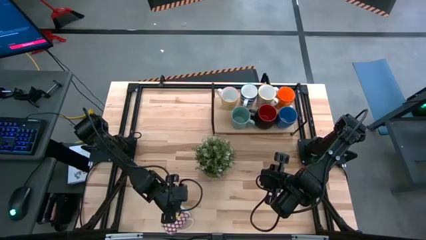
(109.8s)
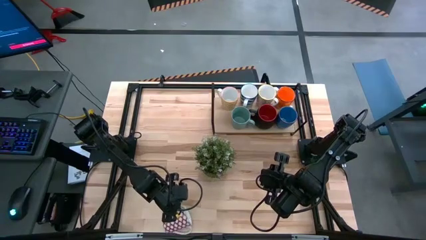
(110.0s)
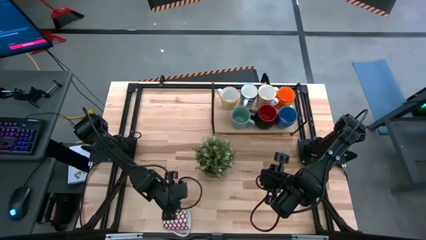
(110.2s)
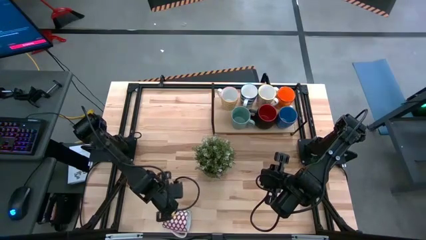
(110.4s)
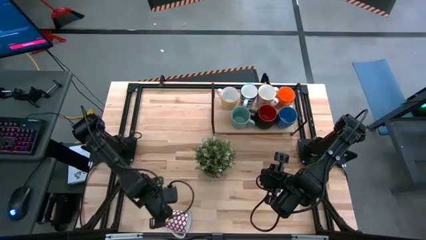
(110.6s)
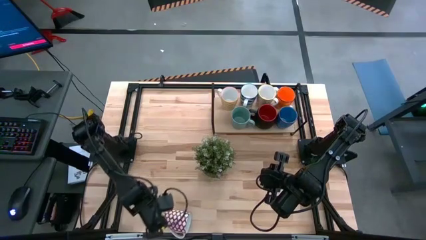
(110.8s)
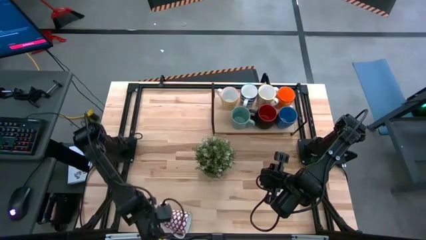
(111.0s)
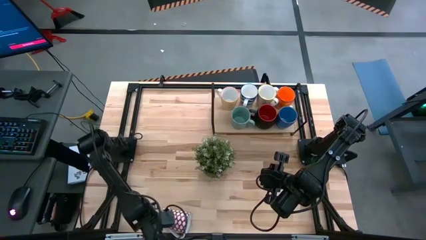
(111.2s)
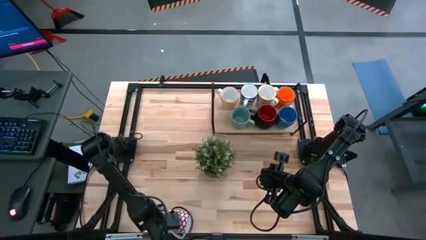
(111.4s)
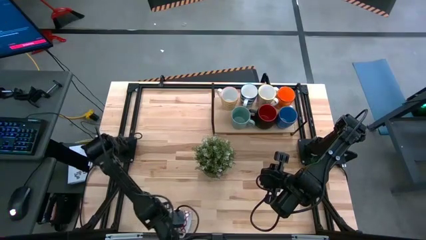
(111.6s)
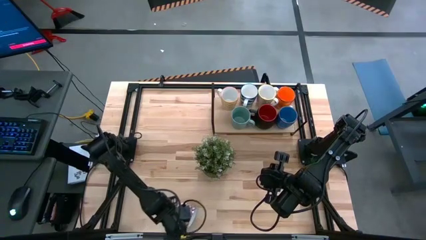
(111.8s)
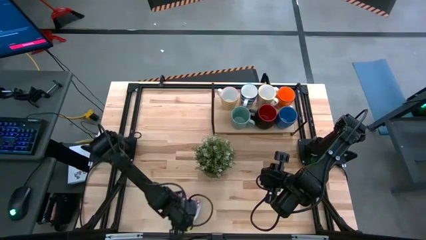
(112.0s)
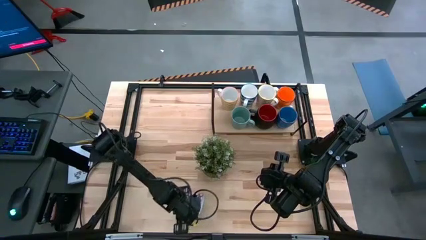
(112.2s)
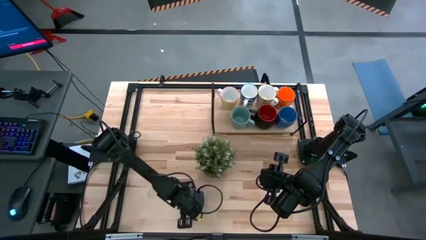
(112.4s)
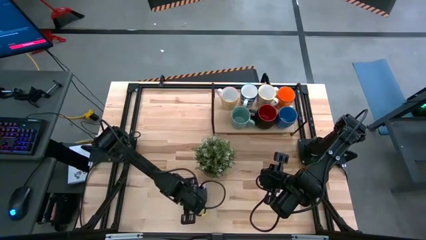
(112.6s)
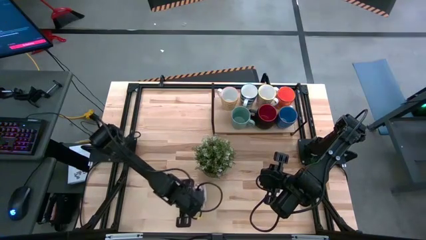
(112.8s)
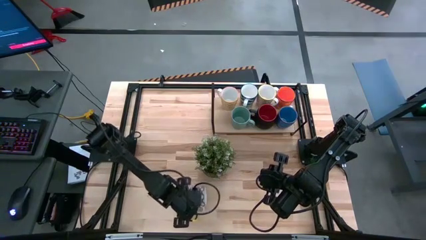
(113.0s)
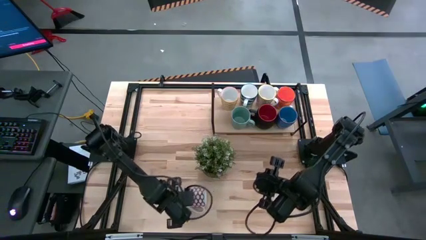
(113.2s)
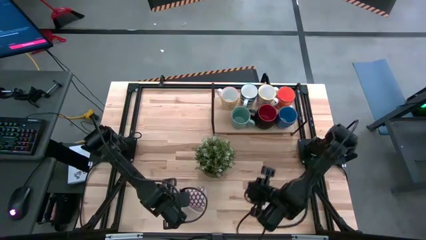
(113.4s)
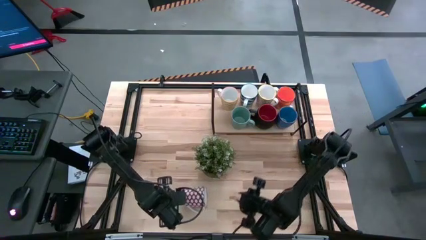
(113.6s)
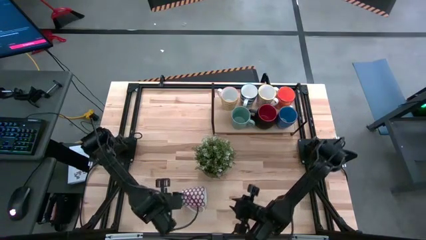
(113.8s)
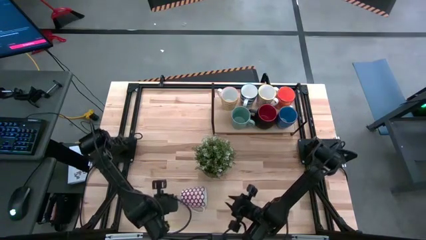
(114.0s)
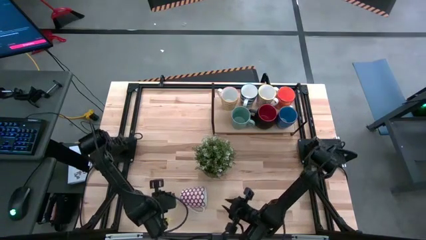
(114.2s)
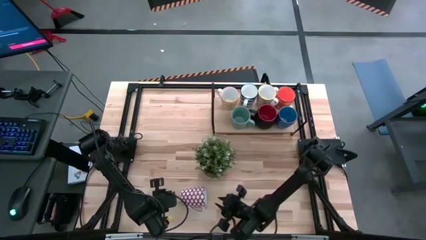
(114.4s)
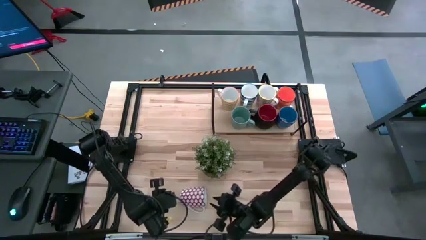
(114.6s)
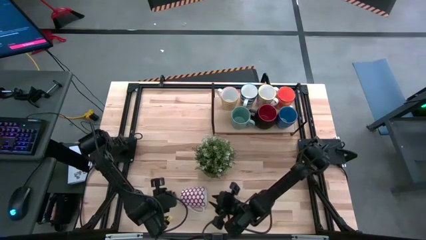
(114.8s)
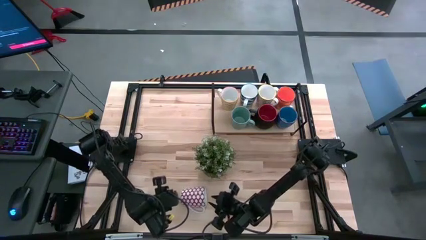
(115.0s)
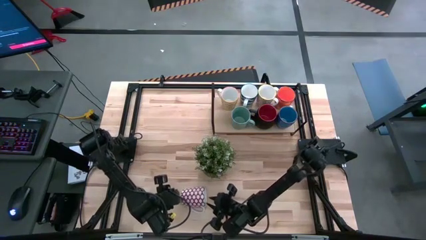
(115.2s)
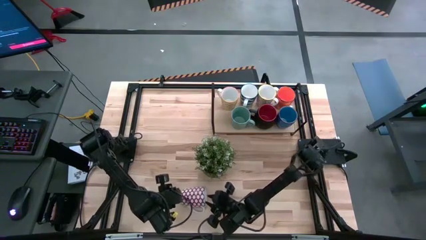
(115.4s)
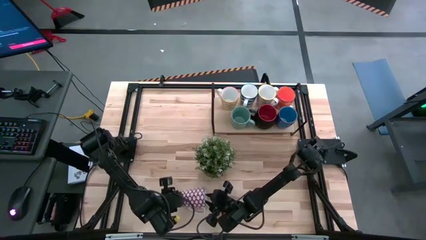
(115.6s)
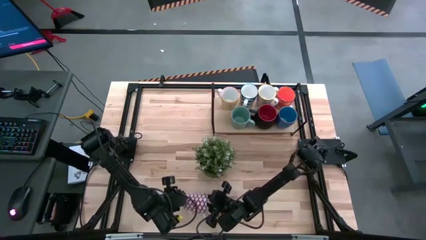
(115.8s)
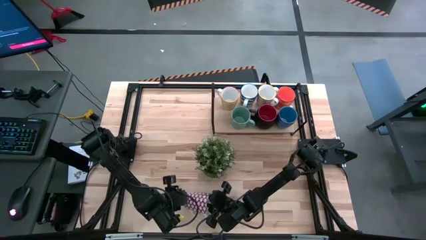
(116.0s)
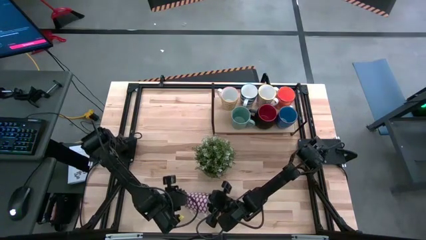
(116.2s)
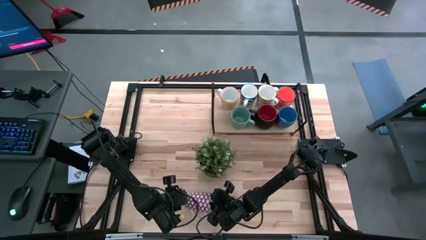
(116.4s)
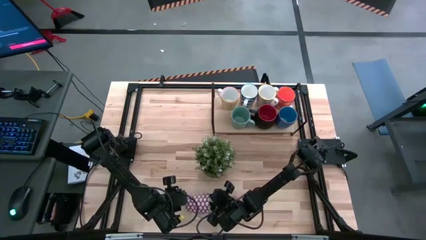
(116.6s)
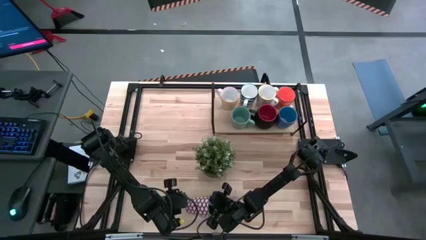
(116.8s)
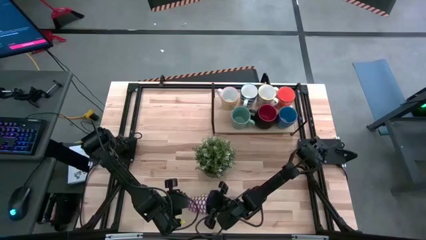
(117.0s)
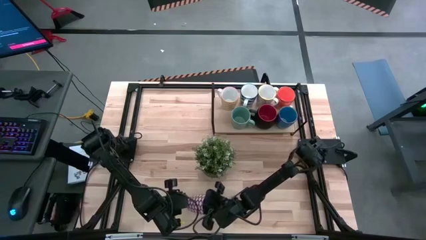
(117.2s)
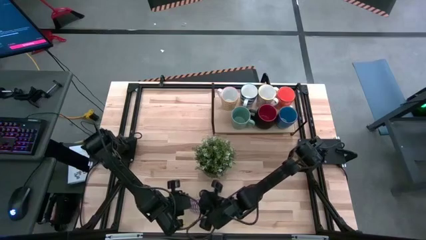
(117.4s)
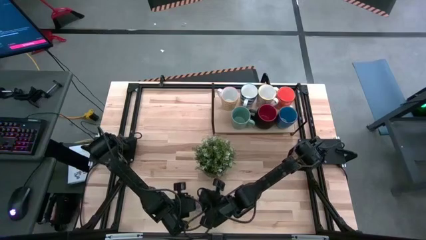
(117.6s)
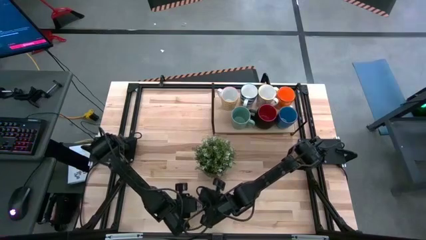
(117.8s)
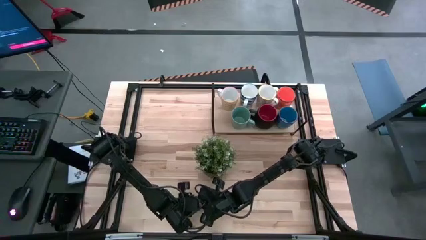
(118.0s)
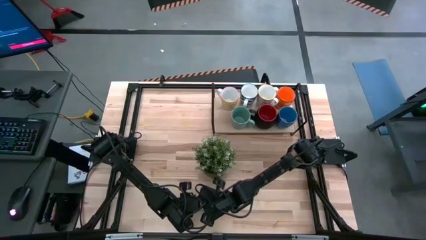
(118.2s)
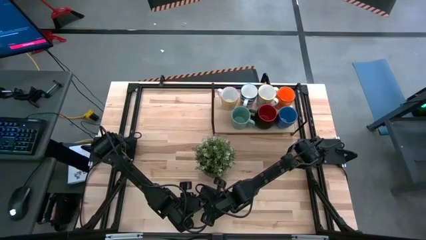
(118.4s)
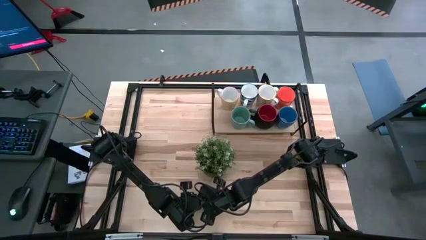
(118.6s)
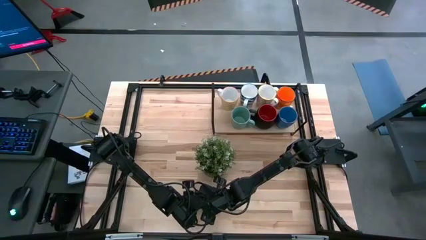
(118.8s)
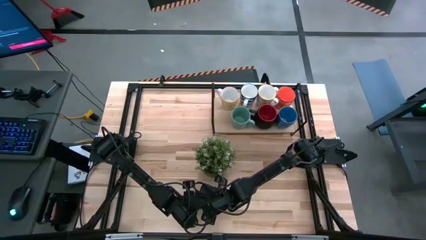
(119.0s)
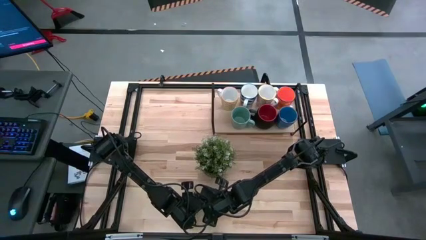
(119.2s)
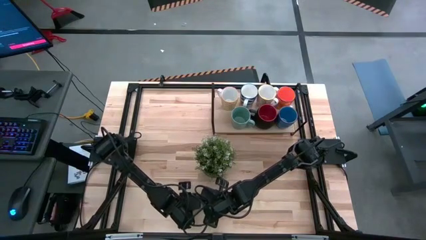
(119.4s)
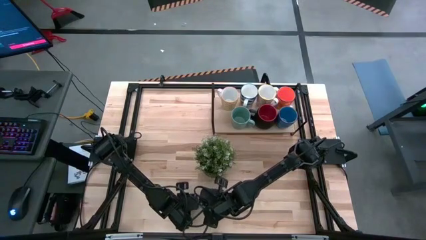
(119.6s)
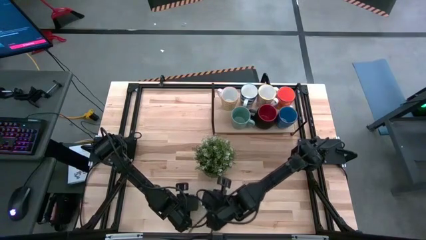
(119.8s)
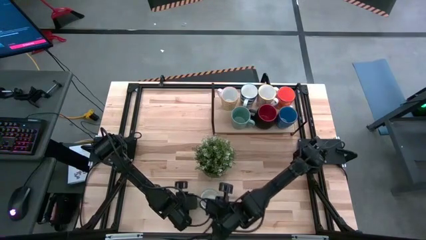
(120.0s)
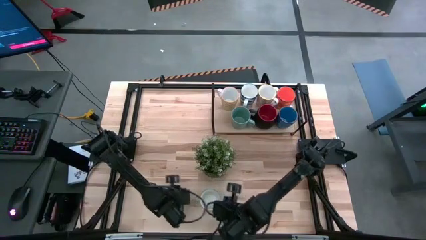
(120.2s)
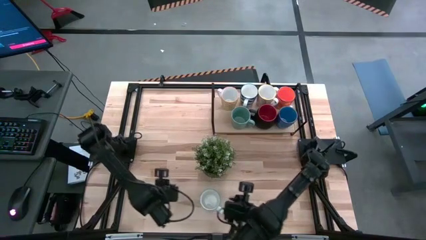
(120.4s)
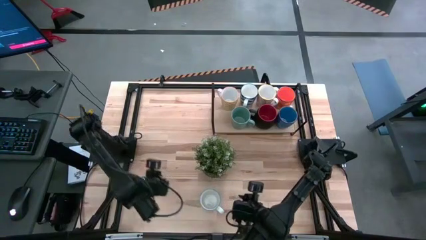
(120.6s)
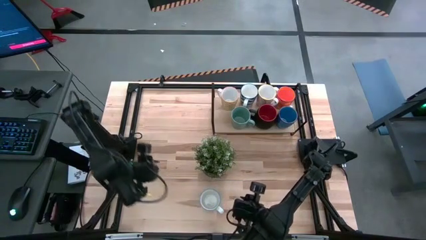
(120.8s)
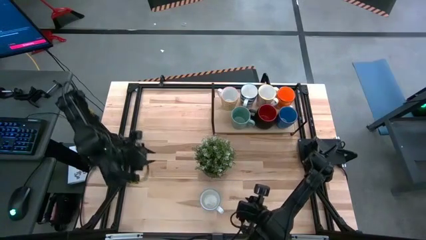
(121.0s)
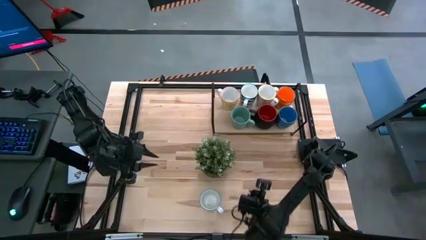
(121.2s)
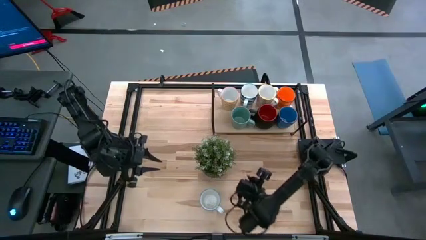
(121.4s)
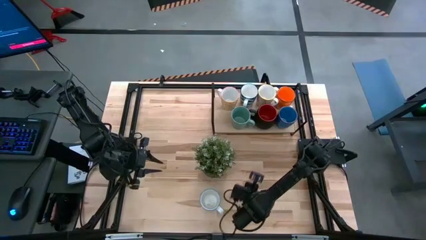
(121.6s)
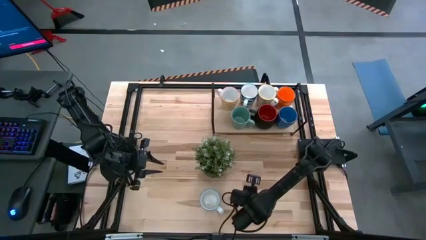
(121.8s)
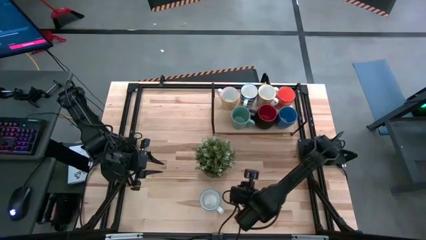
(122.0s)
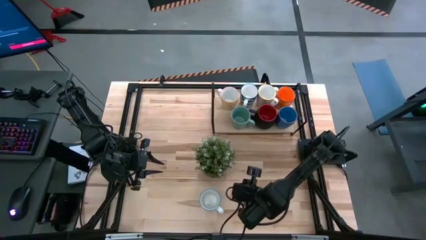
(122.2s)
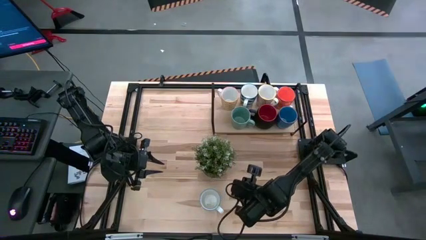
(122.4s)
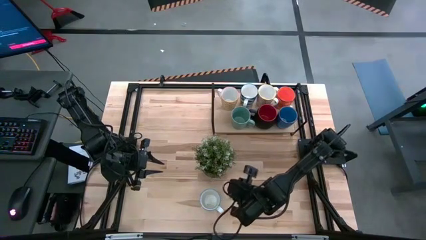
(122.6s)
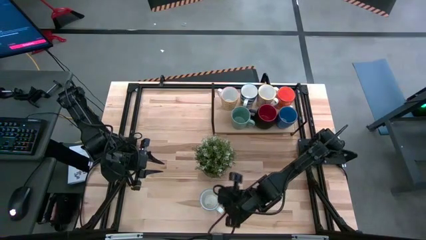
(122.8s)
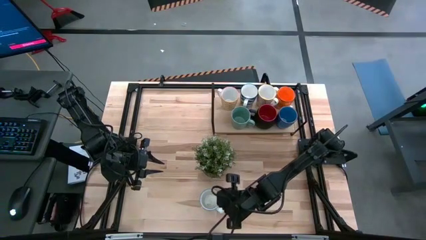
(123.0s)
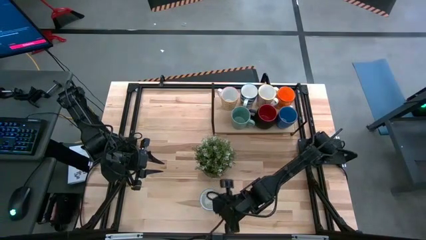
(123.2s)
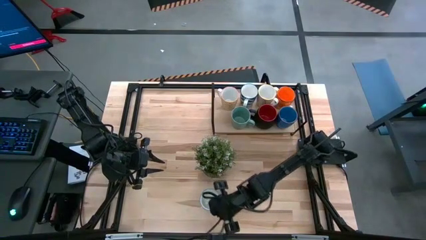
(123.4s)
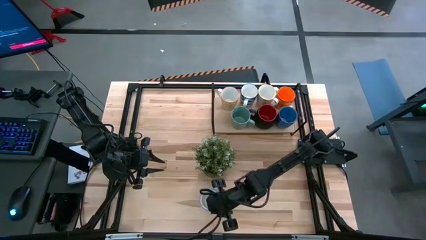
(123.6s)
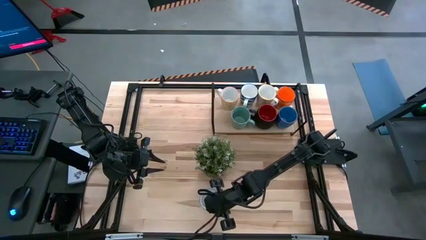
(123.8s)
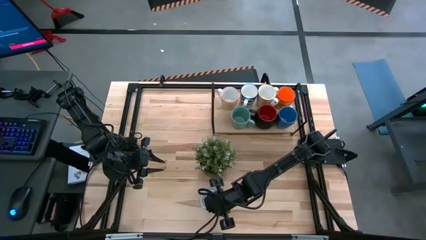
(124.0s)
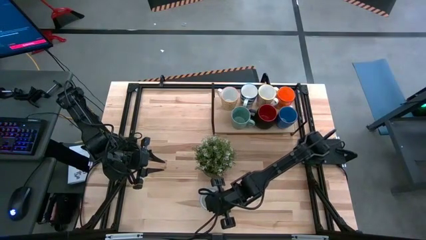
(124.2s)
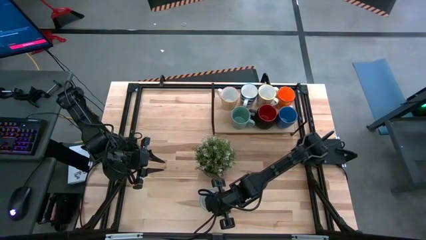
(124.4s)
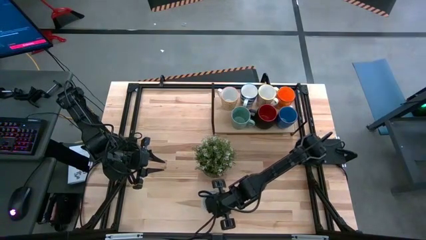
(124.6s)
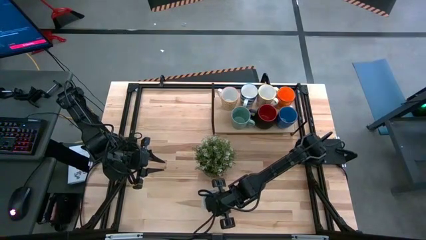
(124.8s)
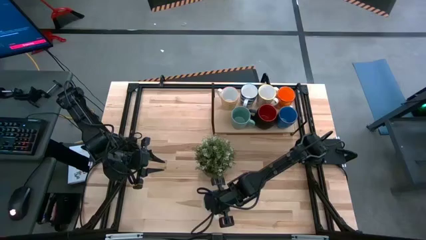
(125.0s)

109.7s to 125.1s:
Task: Place coffee mugs
Put the red patterned mug on the shelf
